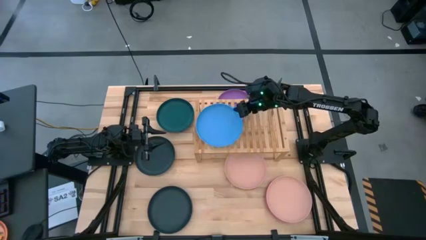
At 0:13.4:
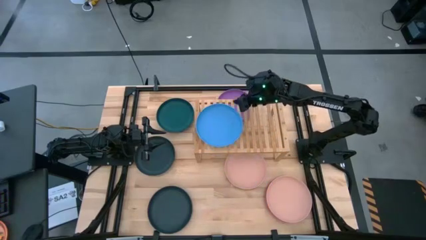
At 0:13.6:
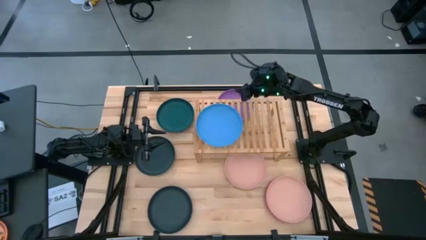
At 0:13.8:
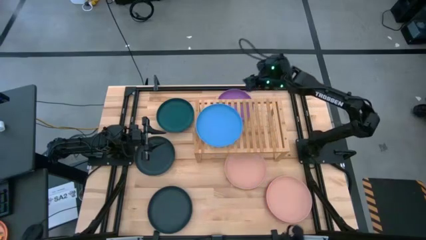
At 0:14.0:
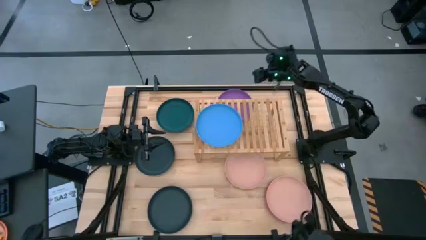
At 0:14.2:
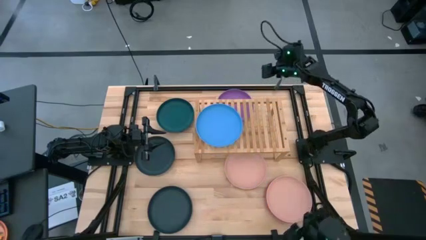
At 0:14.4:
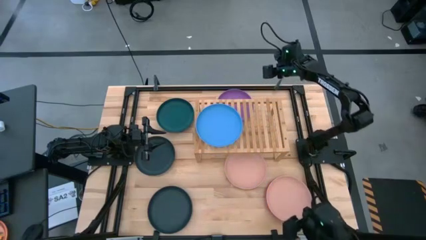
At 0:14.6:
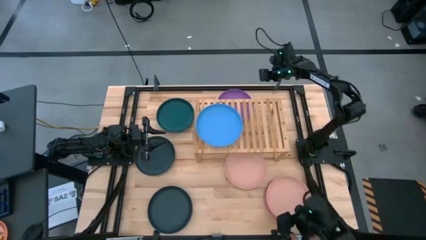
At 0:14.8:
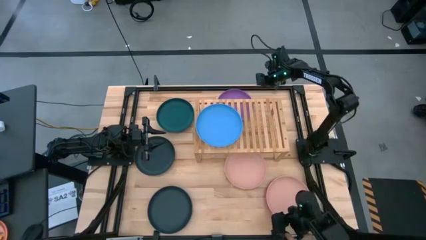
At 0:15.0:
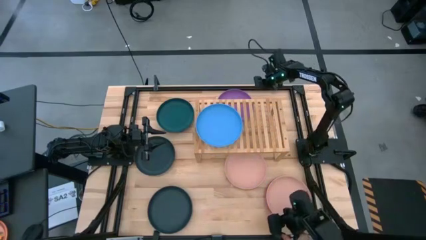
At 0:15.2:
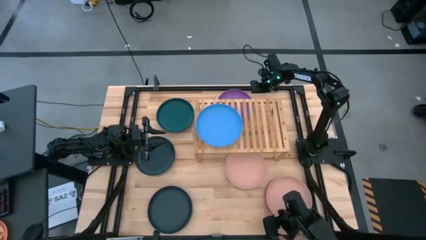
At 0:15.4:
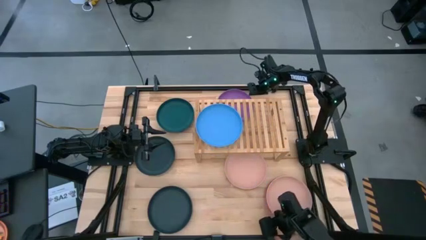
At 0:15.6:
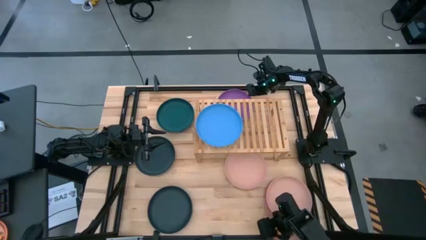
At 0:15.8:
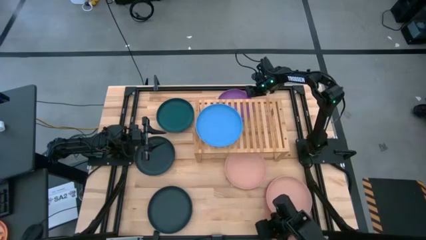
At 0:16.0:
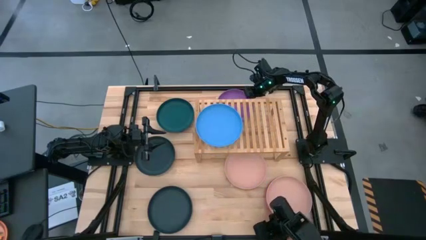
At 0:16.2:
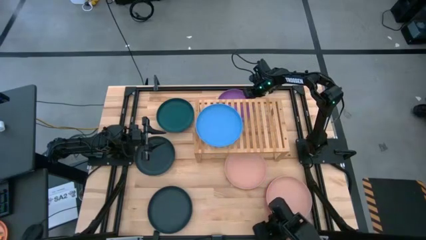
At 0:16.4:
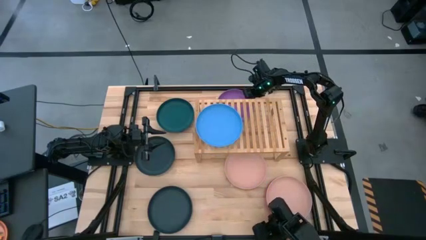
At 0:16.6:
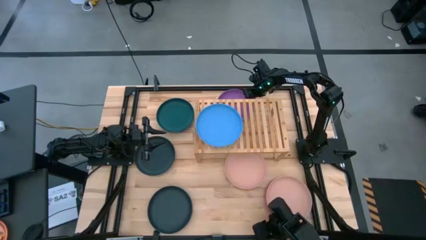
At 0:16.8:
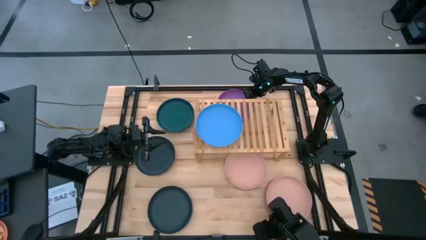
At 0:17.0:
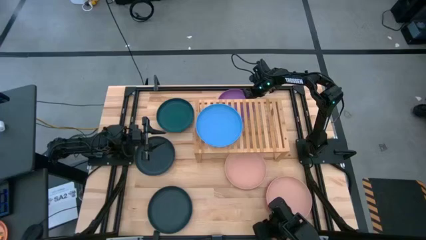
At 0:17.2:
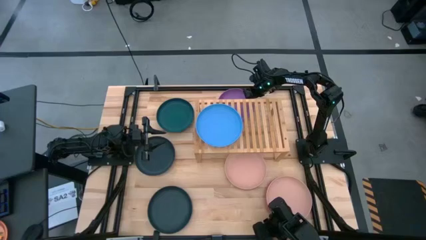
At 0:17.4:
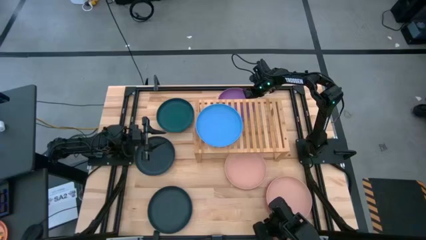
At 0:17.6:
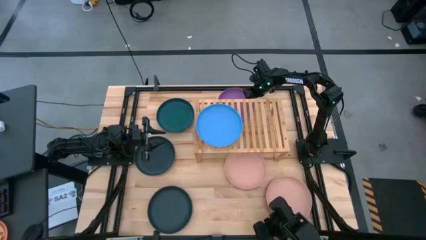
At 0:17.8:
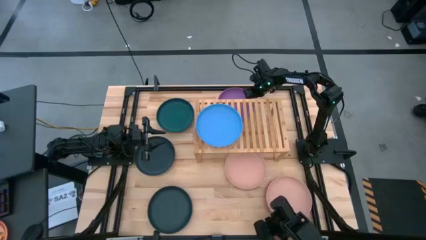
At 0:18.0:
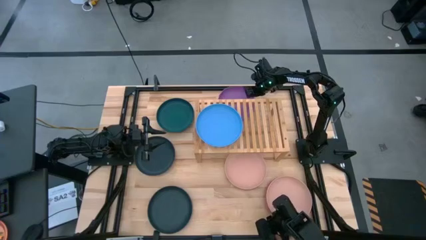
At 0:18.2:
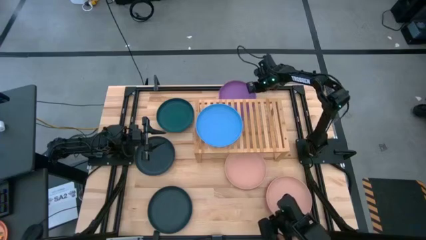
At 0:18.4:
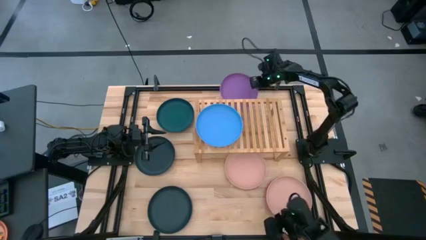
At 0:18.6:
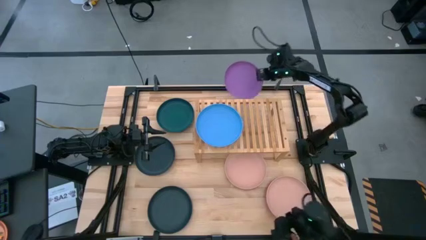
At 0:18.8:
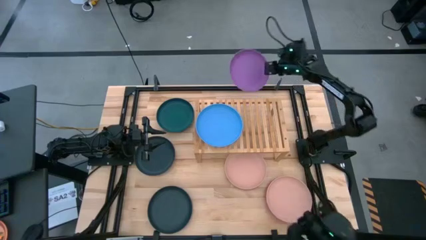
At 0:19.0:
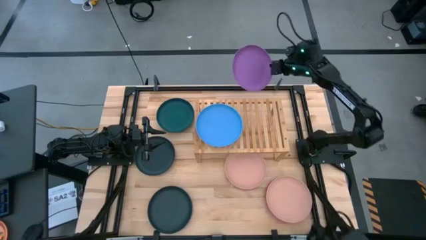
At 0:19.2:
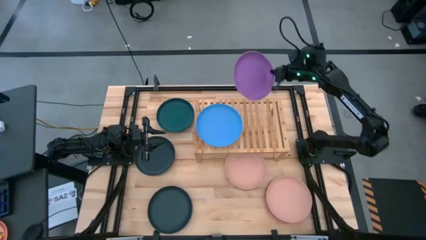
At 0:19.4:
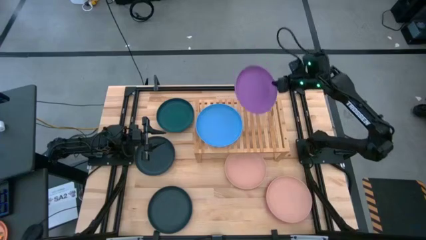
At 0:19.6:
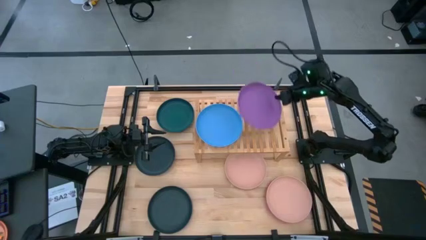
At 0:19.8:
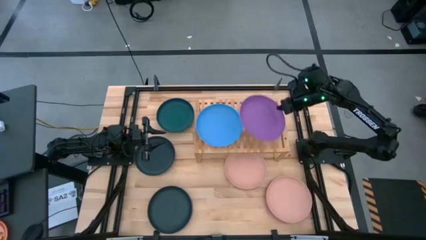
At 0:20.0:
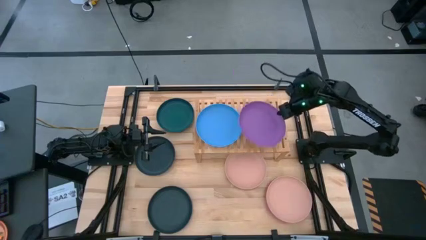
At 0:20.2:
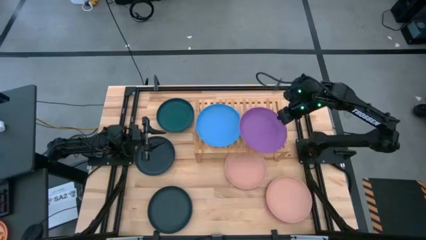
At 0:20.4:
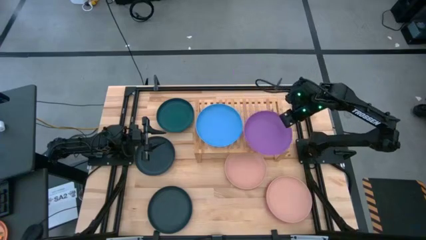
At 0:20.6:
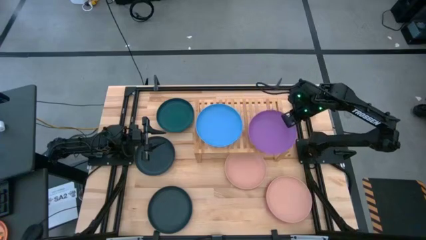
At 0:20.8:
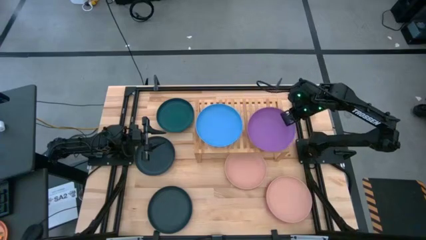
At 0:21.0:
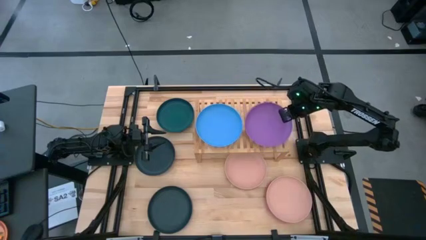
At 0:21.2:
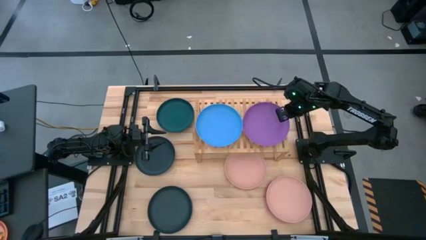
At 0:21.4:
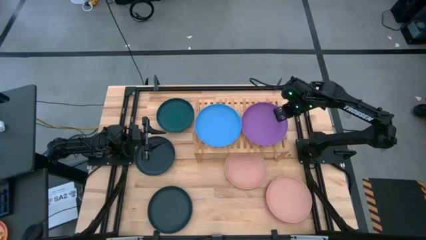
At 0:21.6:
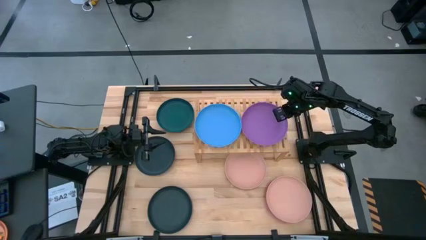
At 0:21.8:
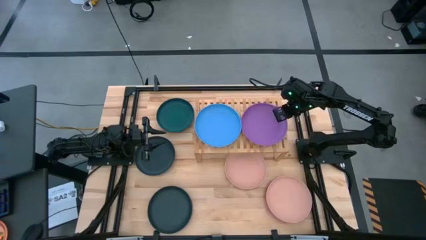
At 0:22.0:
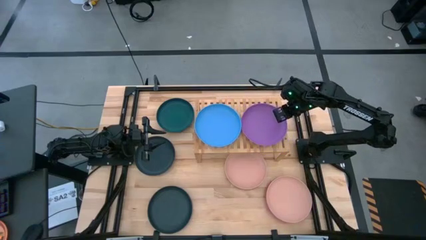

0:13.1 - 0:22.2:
Task: Place and stack plates onto a shelf
Put the purple plate on the shelf

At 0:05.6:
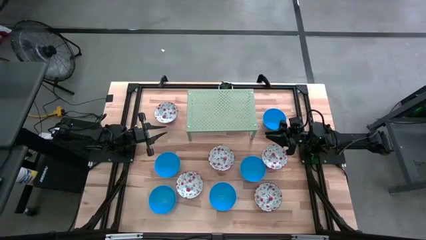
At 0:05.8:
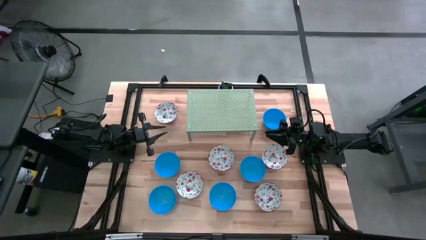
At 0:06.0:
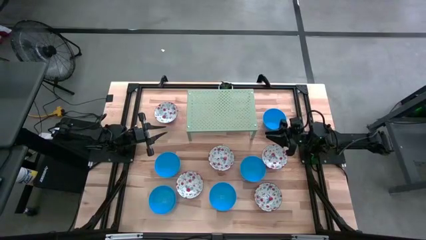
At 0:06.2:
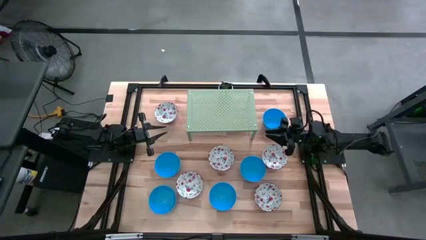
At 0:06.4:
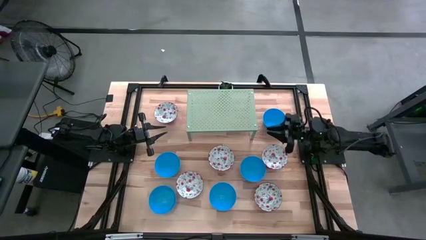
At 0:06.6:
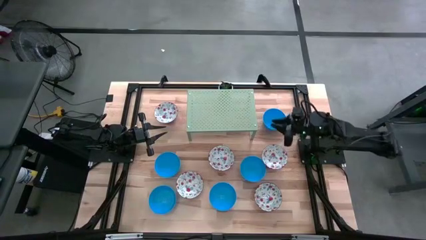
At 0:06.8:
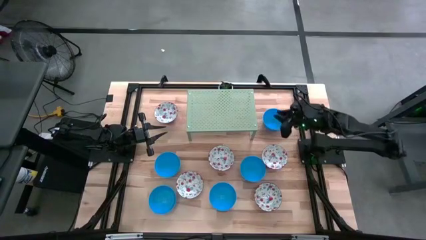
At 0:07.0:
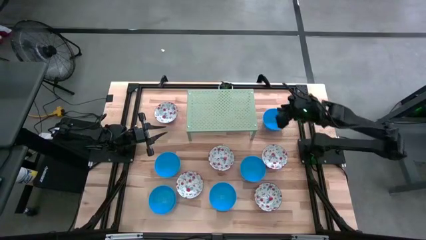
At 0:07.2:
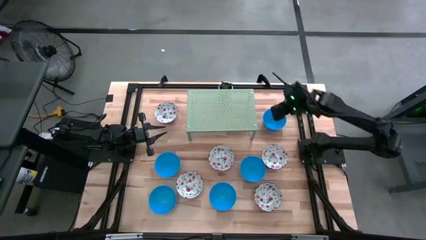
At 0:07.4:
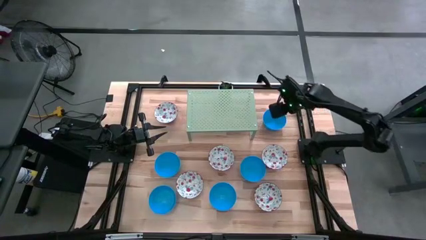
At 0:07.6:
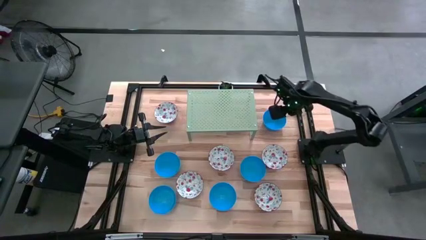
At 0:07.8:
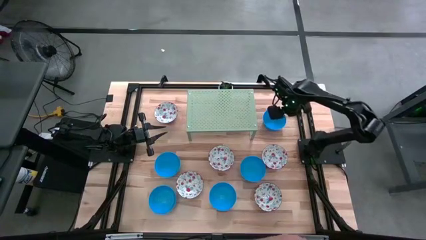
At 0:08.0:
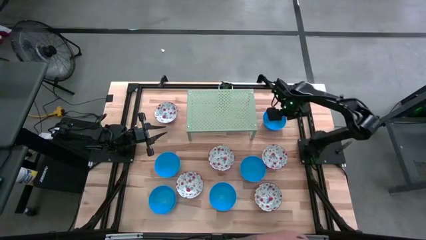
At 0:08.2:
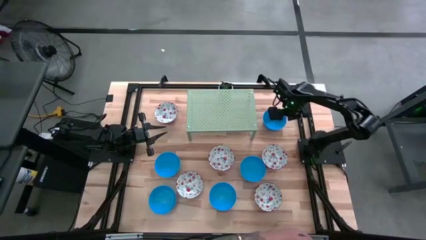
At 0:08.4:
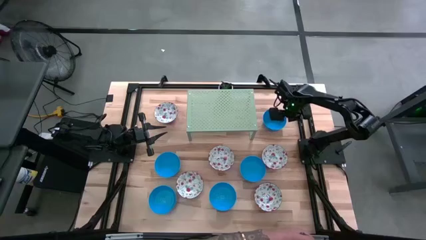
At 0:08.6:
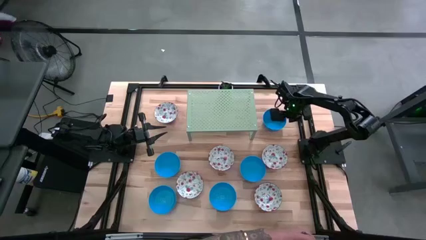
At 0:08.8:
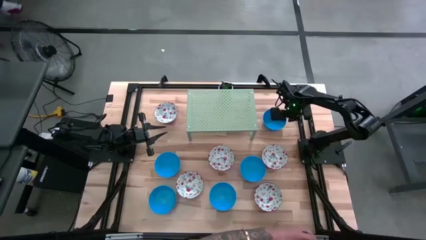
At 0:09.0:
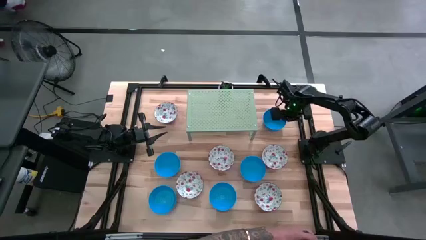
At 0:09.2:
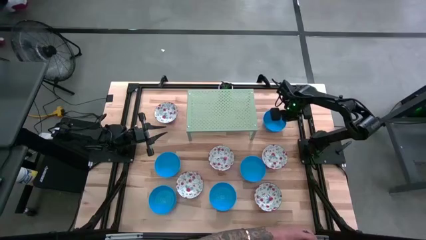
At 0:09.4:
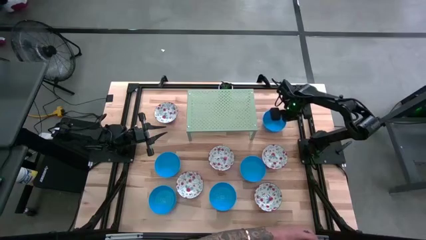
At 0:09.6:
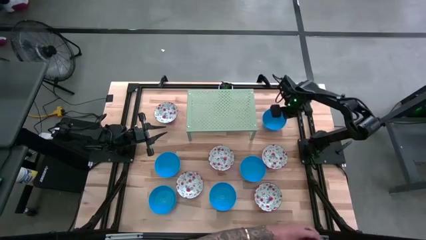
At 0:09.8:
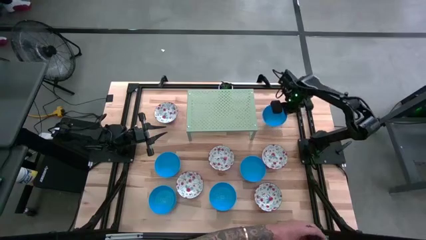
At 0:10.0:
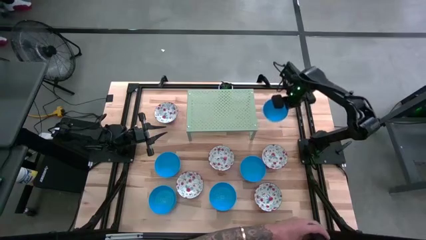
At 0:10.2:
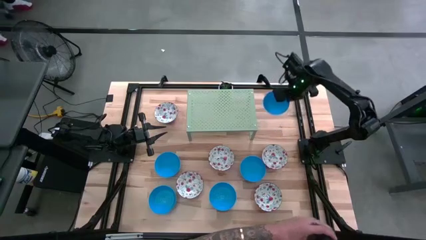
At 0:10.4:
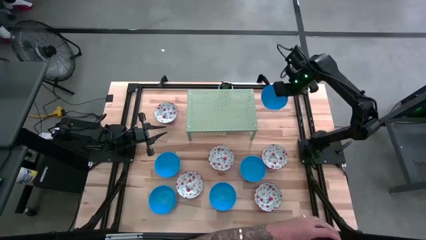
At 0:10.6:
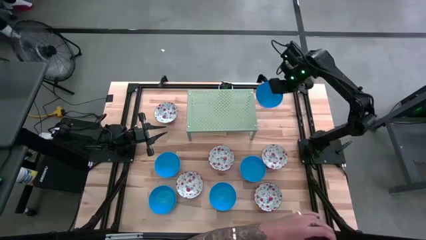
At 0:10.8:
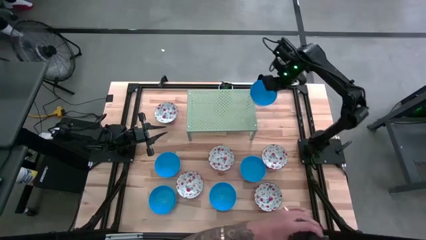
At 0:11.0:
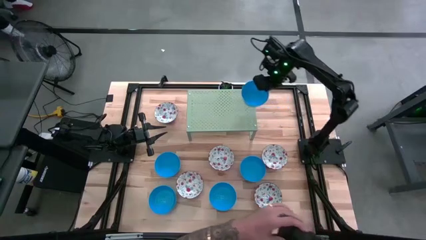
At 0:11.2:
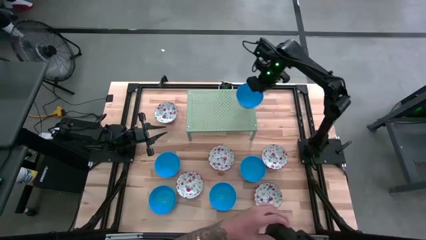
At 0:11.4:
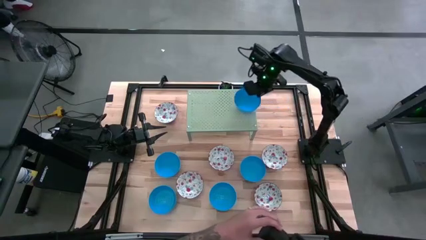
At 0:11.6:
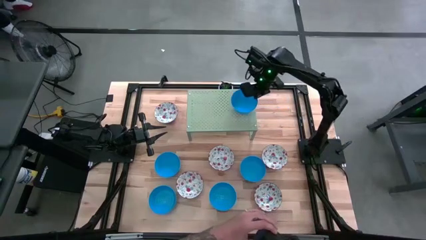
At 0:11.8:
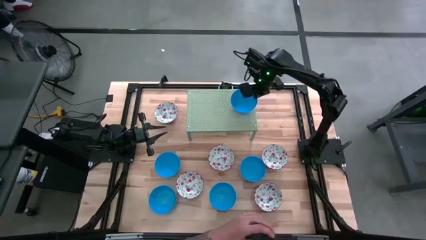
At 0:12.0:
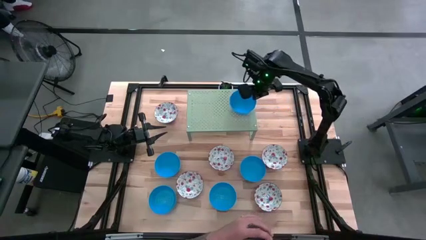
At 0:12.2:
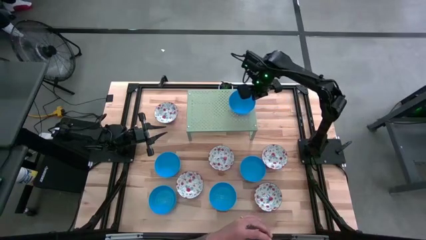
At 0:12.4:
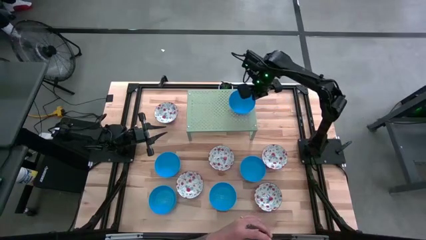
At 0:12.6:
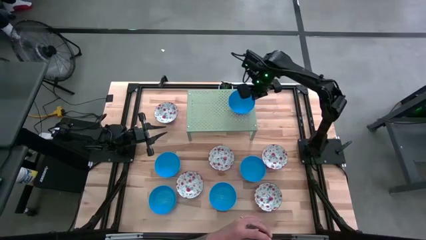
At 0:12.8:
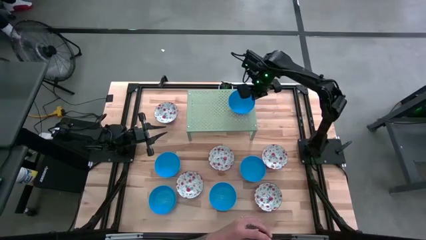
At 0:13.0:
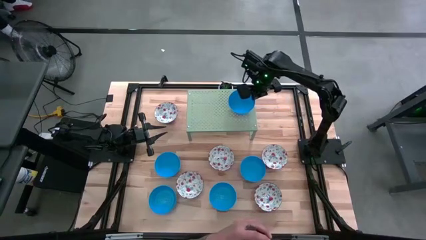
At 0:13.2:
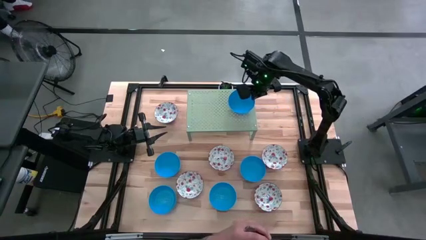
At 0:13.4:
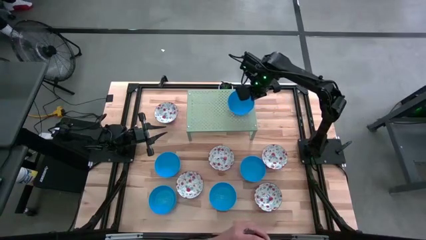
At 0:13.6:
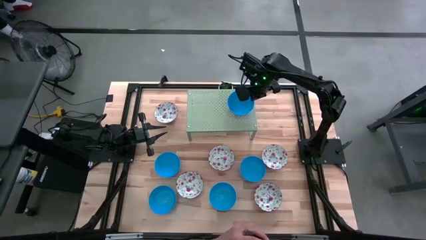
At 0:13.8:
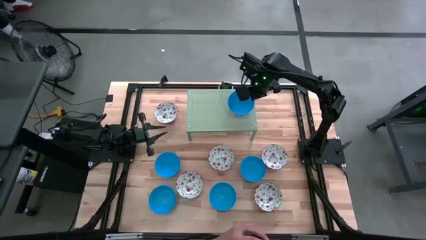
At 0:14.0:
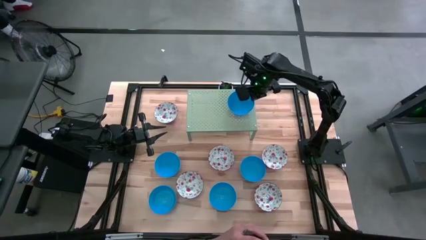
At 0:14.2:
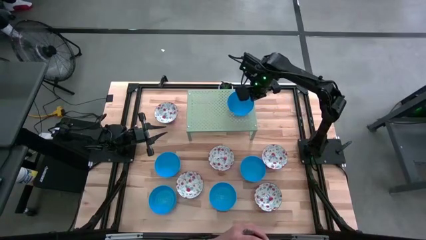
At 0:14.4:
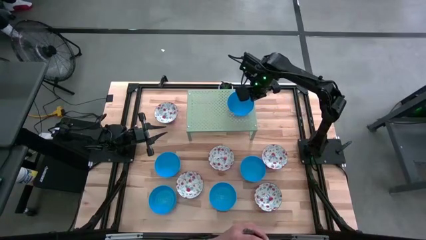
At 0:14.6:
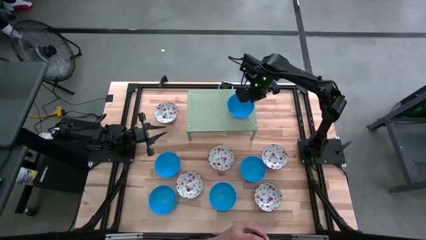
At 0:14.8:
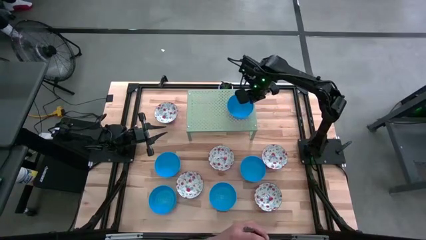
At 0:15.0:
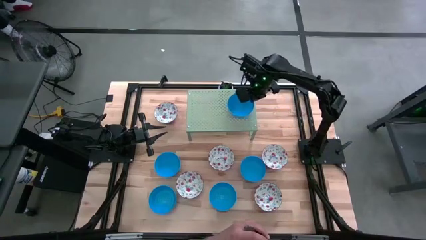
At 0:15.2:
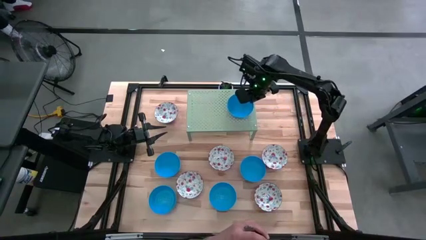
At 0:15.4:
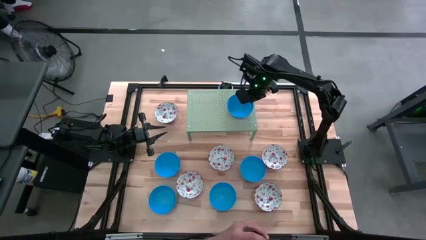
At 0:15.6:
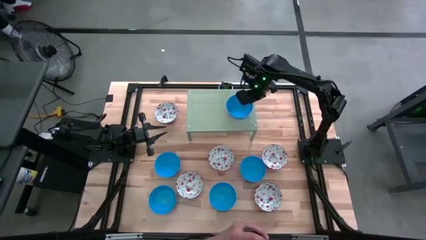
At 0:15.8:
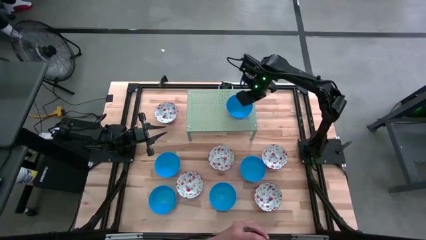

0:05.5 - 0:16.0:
Task: Pick & Place Mini bowls
Put the blue bowl on the shelf
